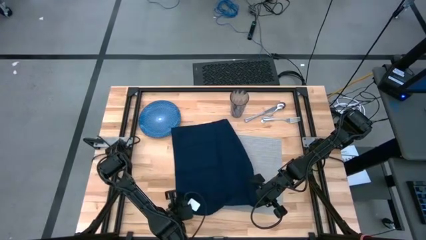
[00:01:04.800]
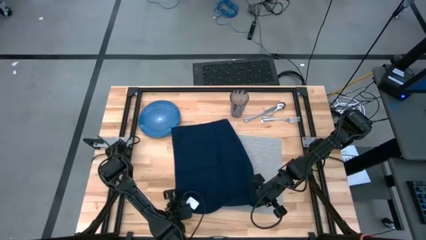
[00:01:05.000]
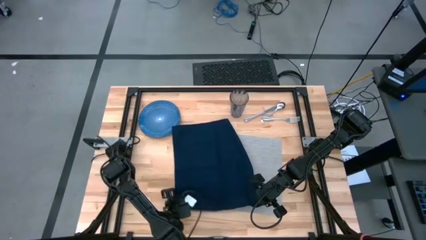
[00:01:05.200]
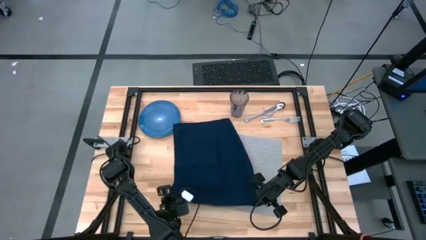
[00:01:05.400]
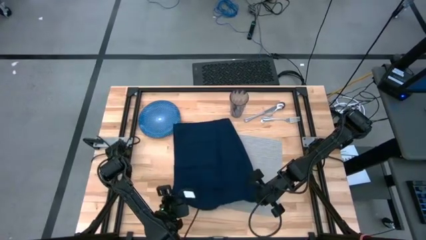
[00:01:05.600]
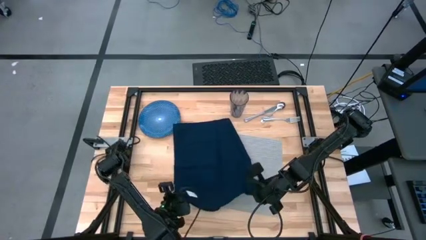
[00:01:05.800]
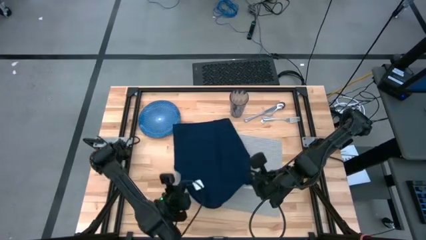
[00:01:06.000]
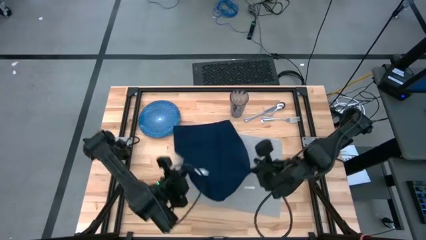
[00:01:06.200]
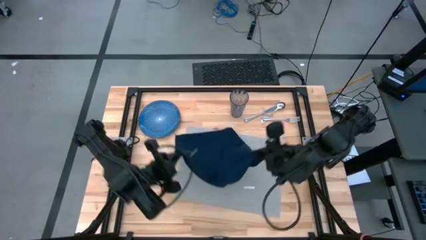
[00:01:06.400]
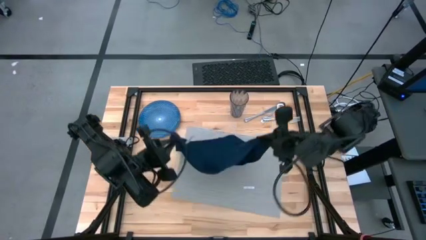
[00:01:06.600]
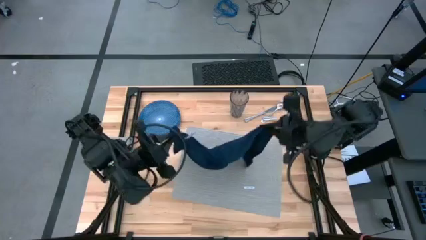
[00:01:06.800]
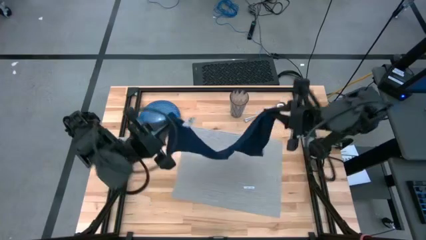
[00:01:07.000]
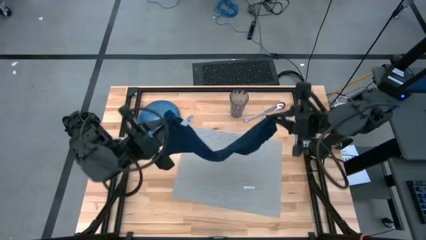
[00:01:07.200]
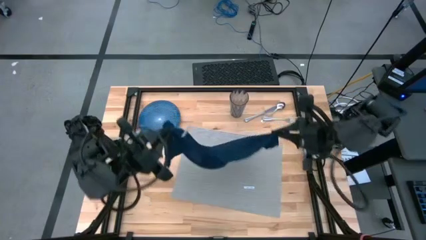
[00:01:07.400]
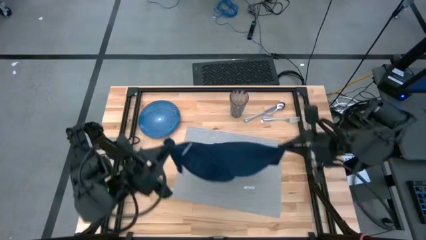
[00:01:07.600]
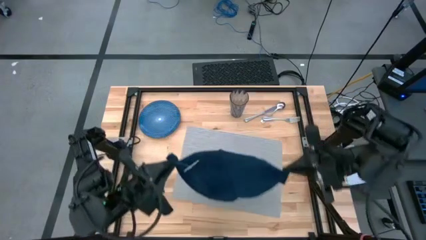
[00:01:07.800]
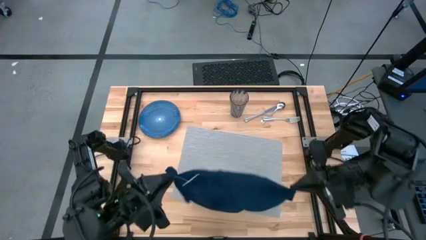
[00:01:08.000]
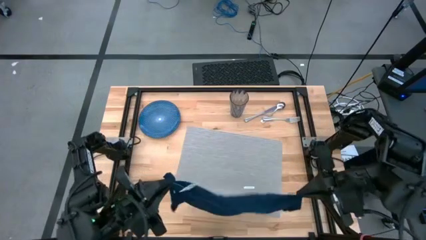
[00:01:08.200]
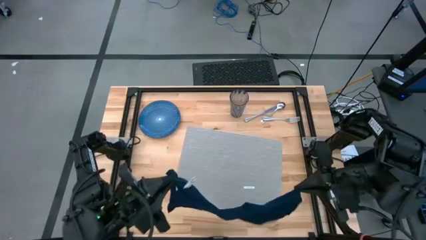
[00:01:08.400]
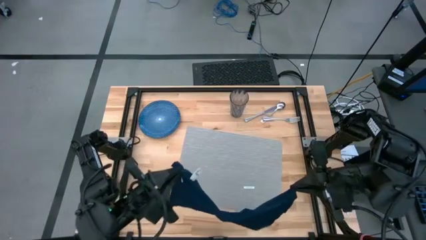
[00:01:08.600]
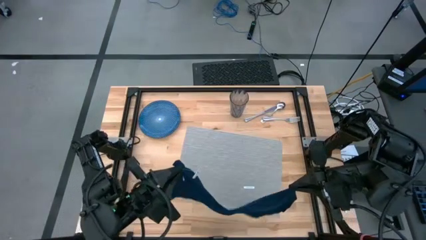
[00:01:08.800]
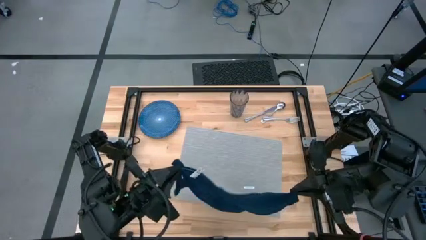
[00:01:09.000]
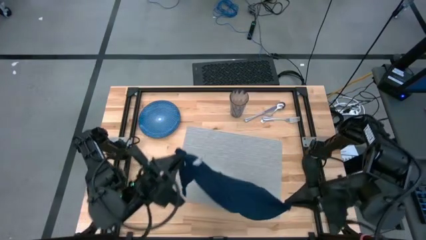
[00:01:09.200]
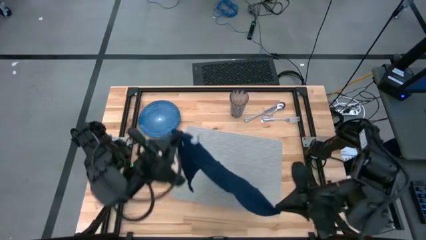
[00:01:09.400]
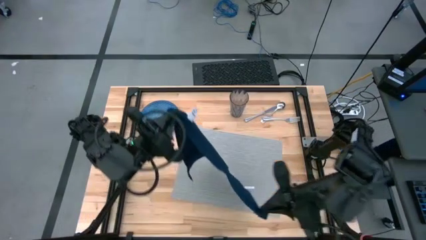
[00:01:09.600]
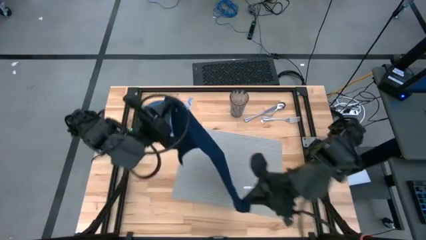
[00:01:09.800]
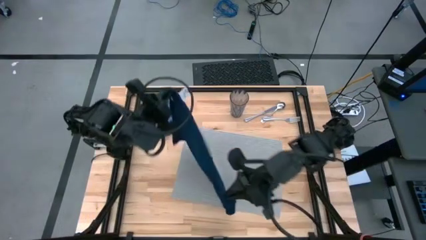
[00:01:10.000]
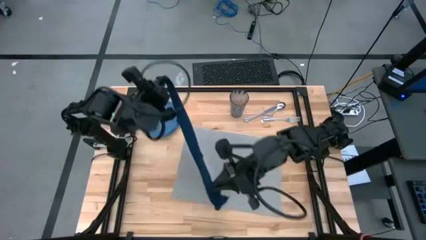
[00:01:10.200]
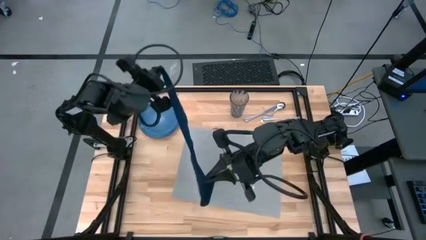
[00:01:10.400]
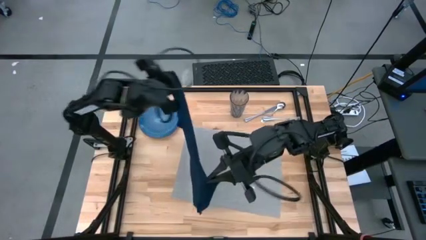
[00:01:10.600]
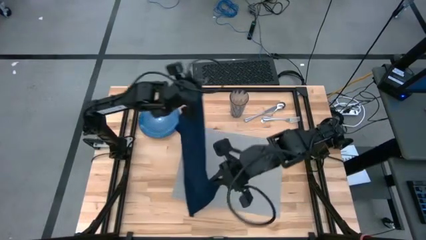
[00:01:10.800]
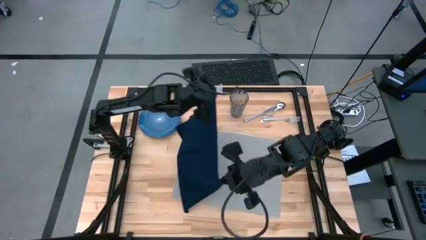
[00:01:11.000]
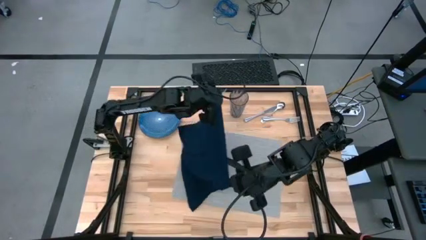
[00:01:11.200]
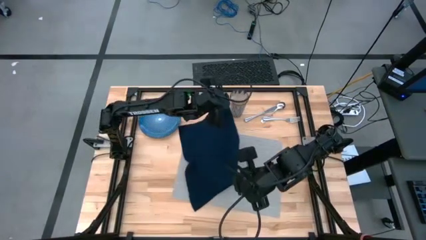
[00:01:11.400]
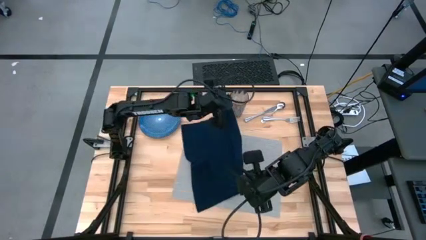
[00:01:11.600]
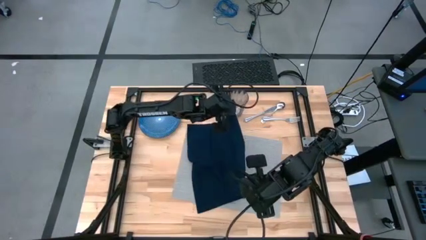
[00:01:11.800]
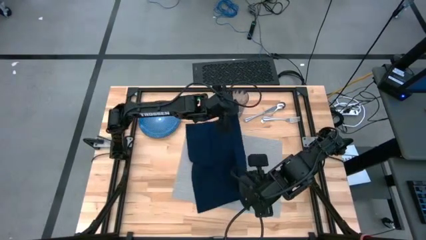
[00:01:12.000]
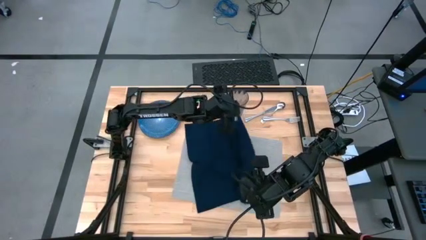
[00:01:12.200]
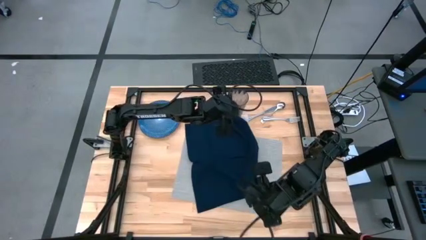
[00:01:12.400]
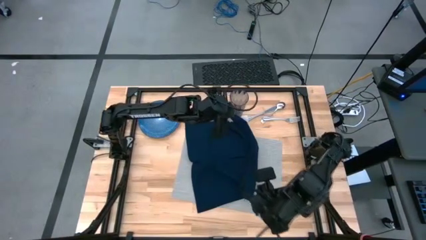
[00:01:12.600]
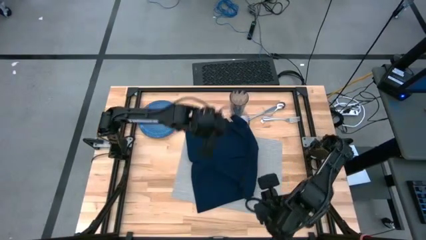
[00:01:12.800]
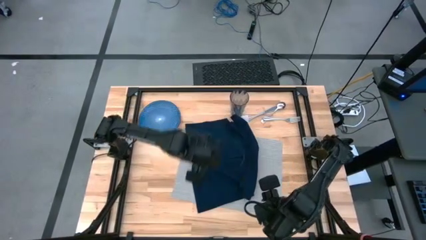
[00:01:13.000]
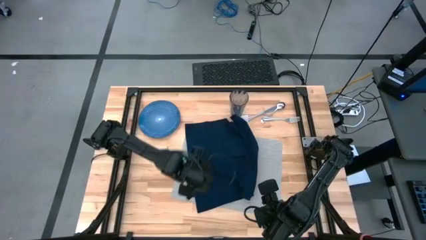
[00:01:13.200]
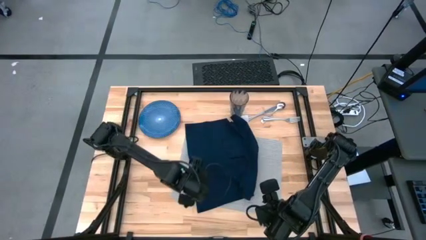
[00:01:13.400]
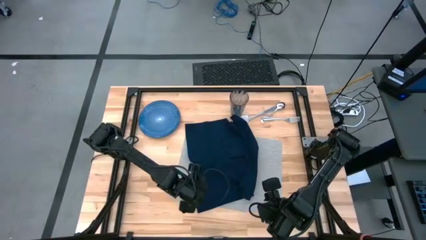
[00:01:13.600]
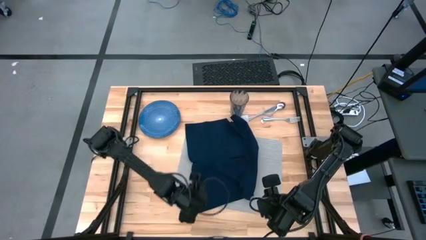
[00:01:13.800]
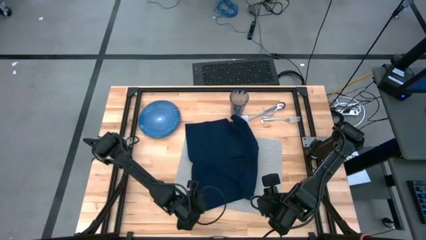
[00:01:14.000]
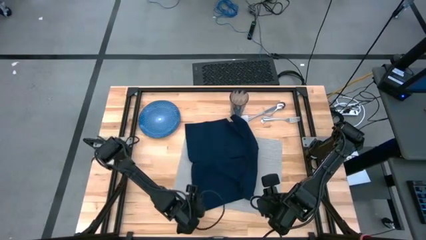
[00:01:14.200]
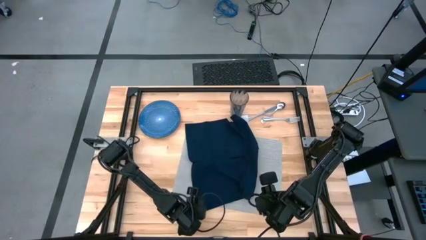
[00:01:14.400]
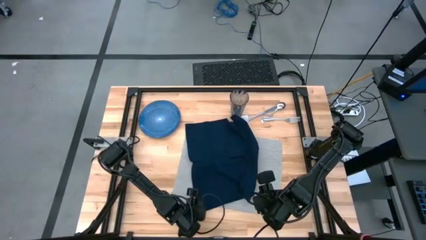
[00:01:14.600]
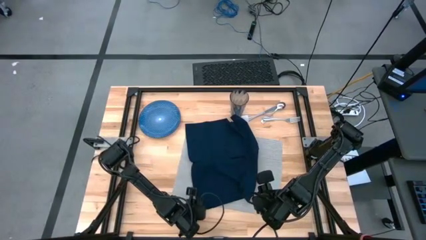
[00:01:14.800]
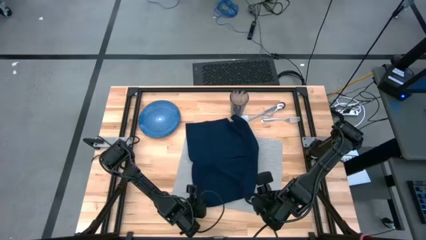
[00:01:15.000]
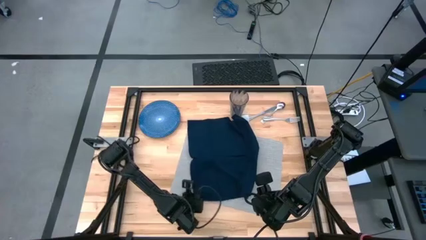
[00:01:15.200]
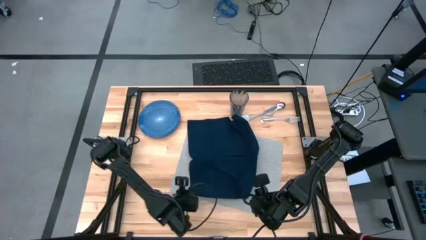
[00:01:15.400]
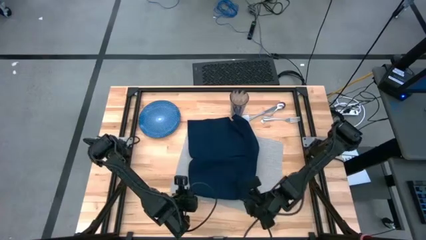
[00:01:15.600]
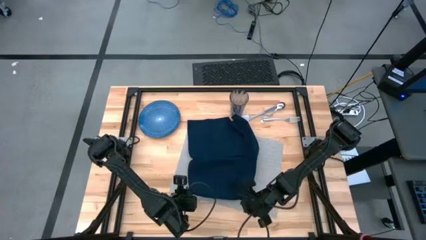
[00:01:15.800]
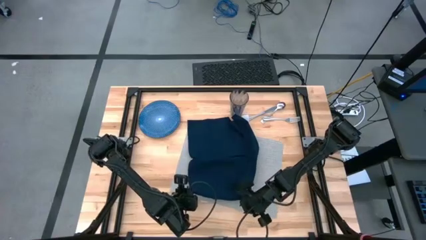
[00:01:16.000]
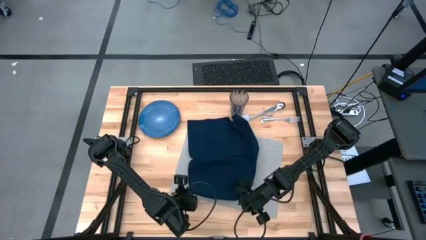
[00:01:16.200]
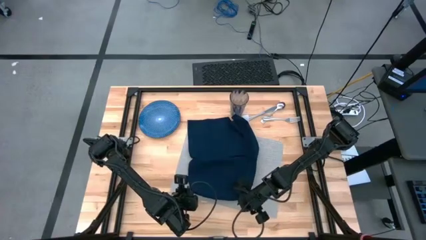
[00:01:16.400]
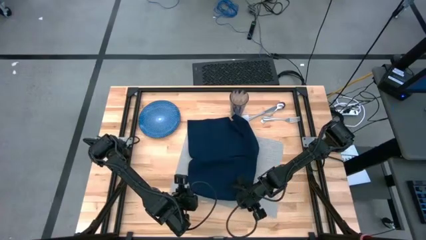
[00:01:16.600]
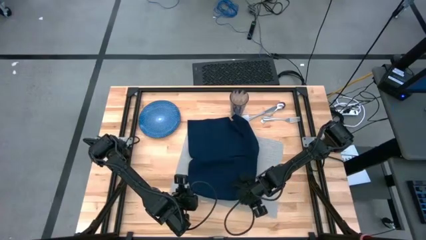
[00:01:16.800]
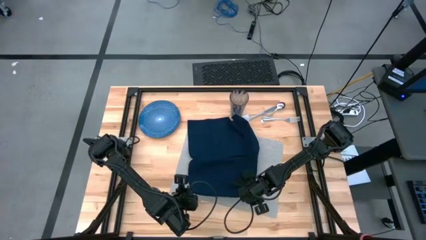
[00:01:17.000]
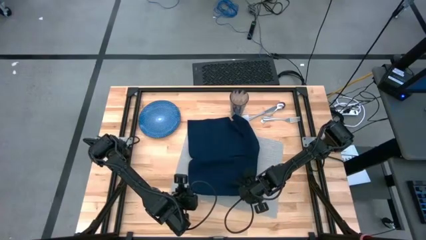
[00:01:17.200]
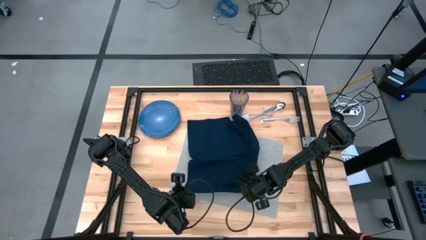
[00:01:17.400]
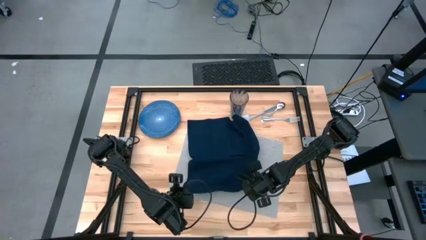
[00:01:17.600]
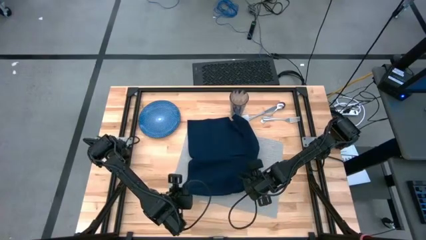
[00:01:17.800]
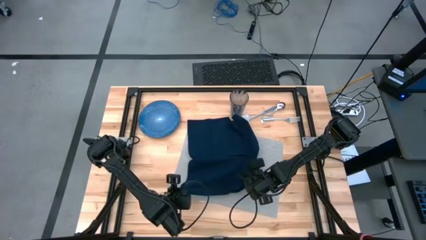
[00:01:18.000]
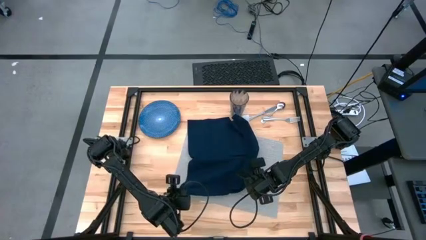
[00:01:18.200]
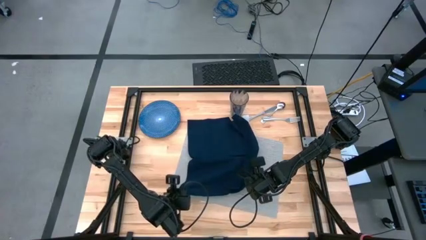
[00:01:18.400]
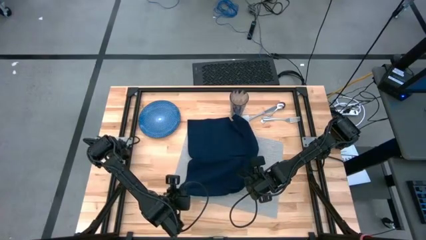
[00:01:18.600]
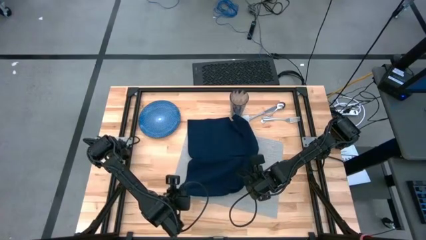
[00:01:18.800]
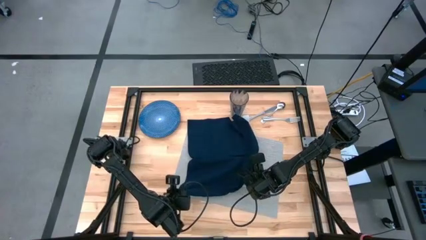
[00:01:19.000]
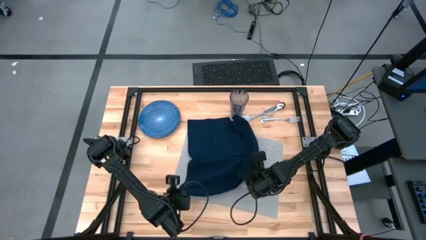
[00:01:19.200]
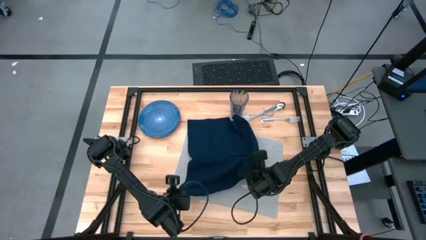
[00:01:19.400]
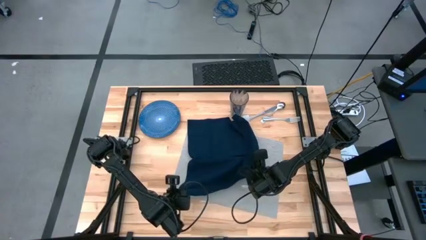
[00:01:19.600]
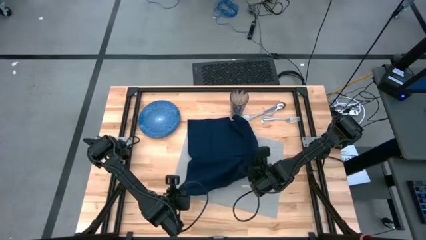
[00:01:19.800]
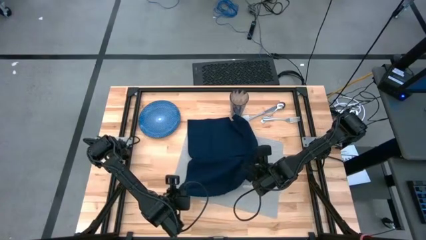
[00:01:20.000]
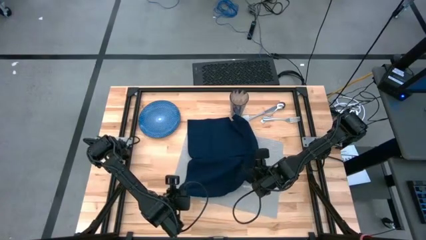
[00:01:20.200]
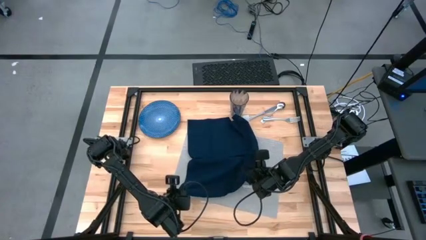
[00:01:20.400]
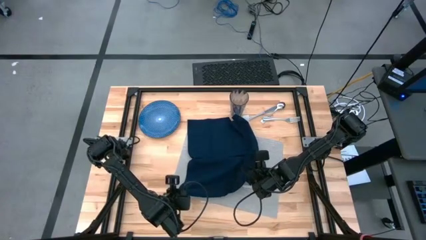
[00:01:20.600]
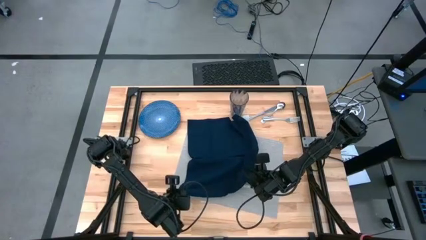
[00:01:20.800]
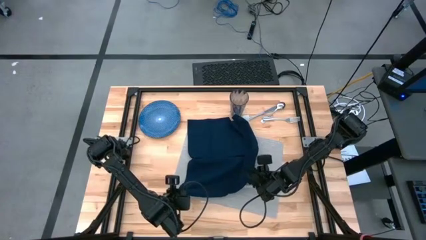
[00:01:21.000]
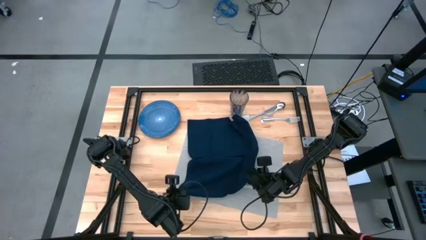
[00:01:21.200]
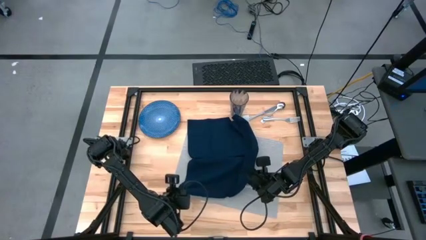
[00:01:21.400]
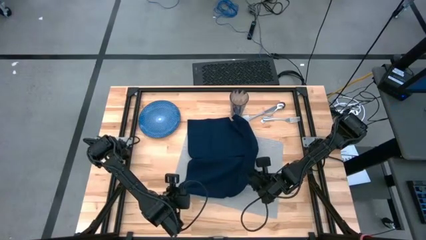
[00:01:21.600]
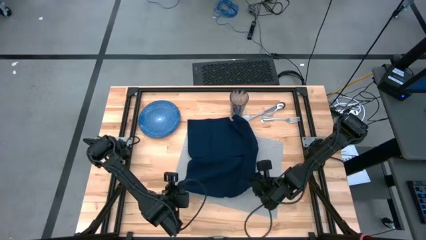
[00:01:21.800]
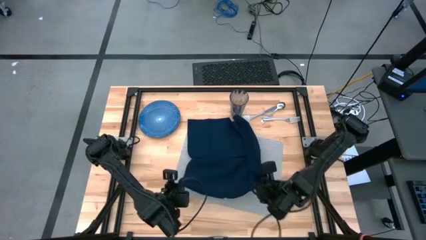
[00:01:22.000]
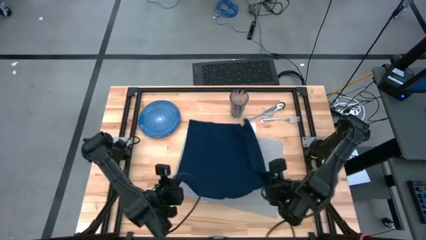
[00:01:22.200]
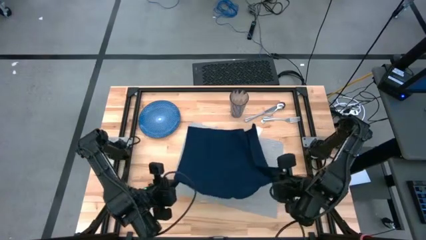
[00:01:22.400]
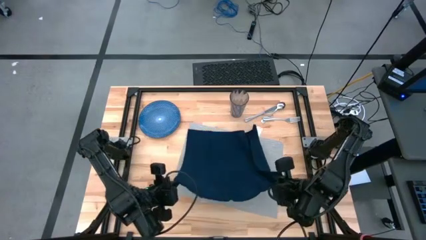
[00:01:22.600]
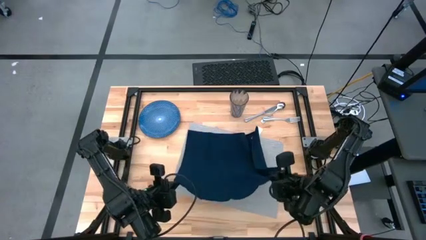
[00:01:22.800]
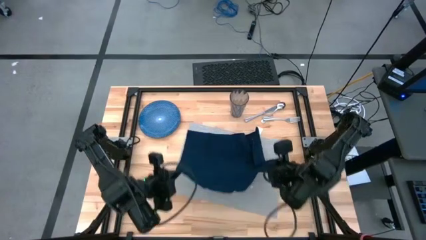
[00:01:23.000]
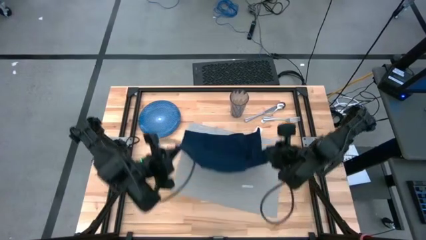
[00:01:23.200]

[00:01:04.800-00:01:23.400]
Task: Set table place
Fold the blue napkin
